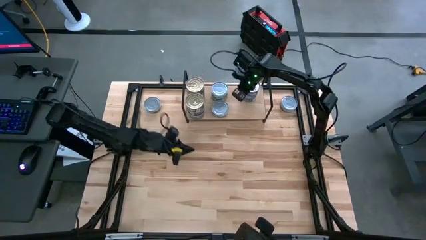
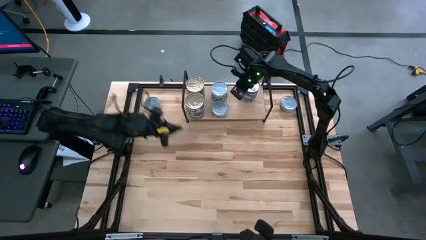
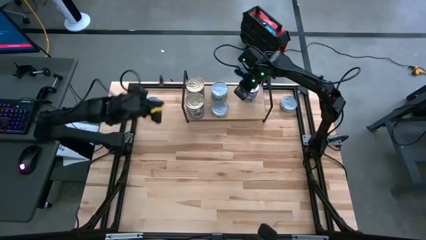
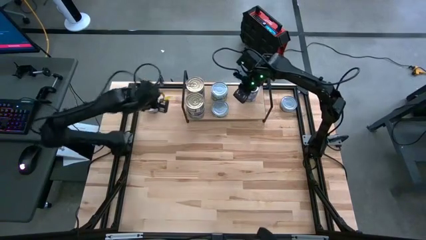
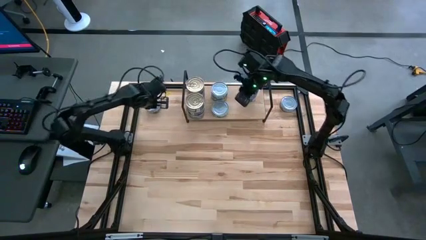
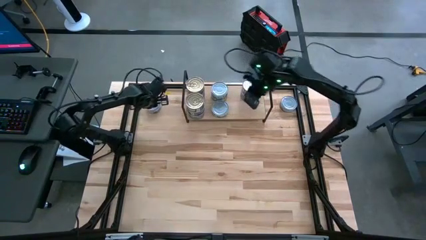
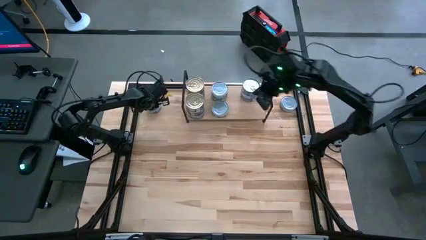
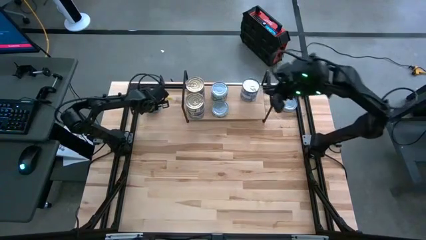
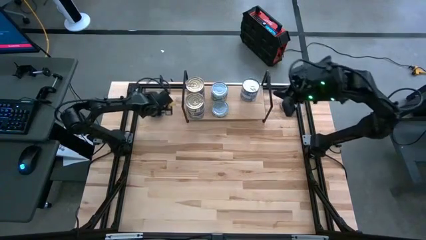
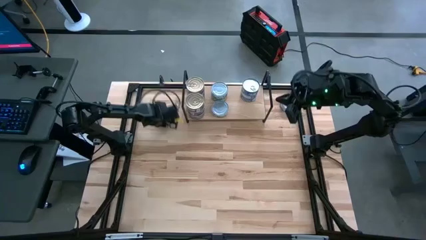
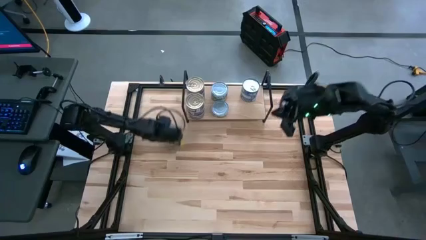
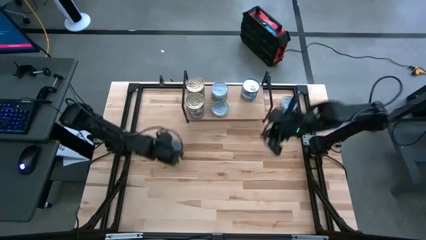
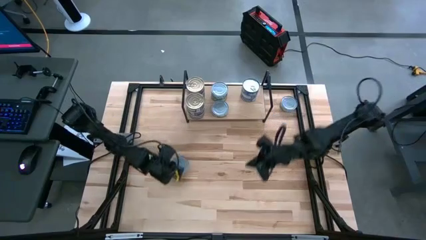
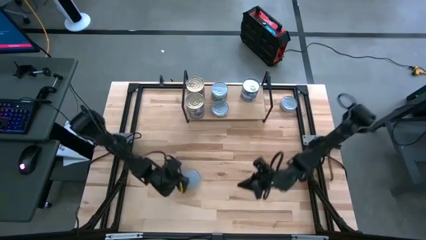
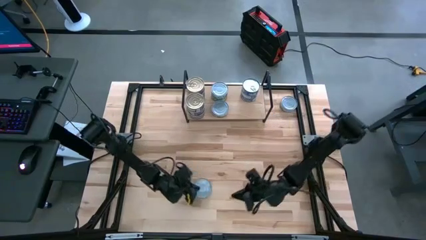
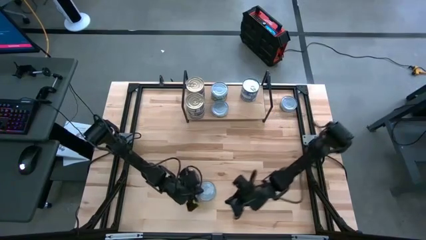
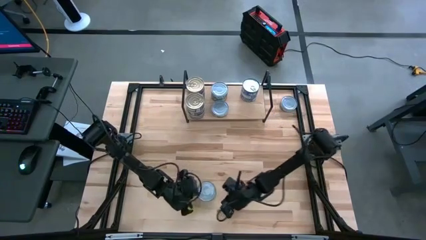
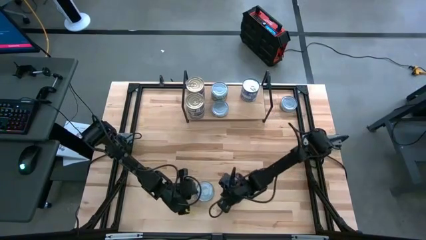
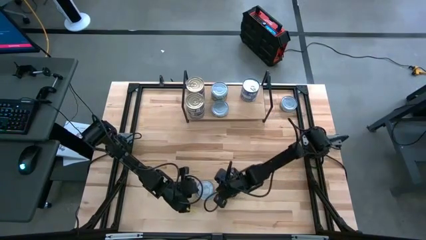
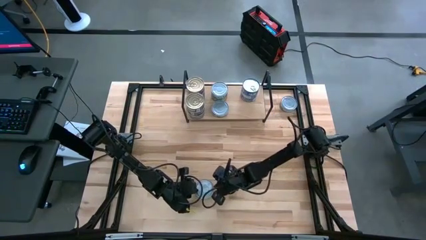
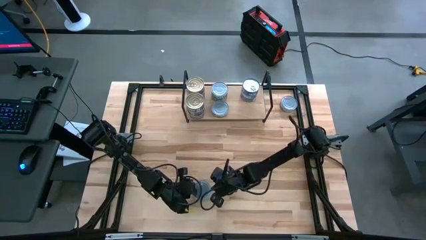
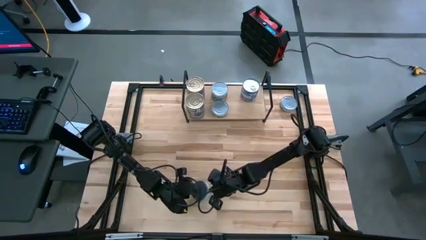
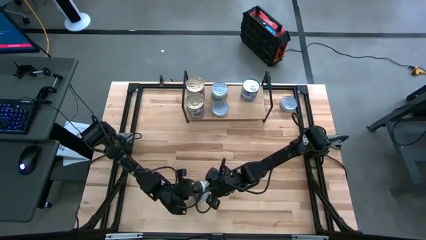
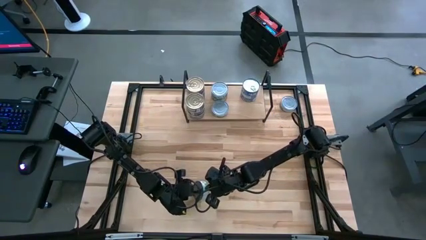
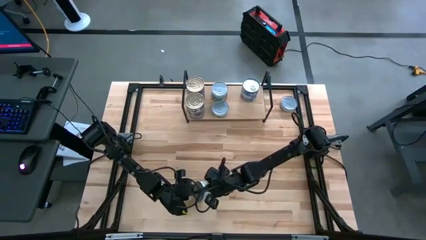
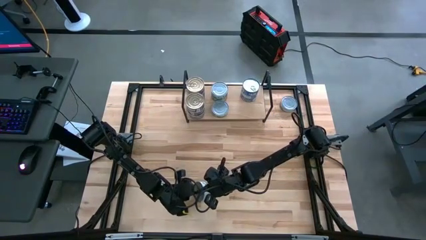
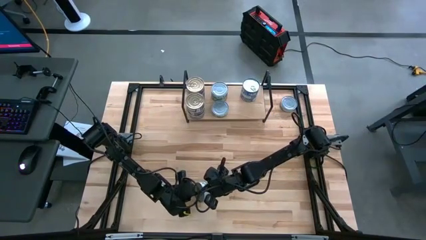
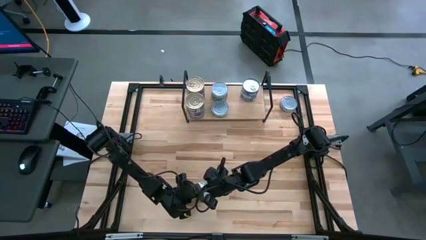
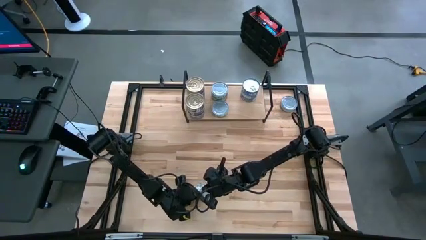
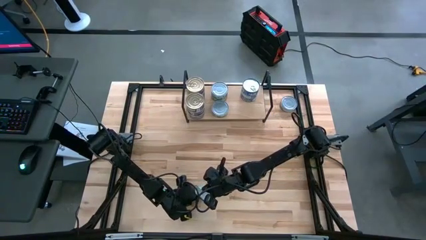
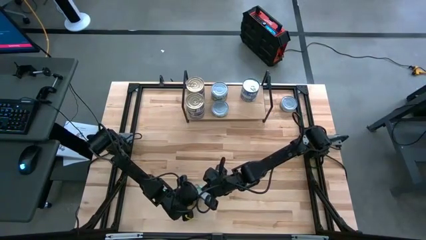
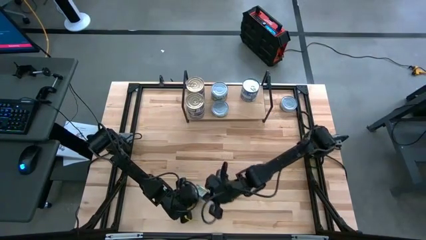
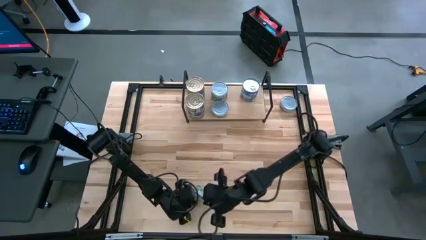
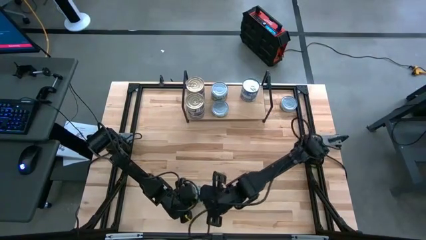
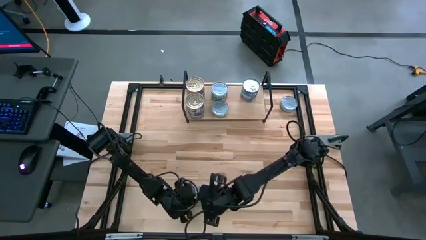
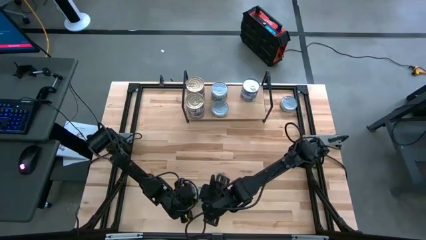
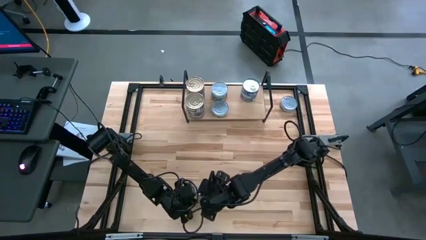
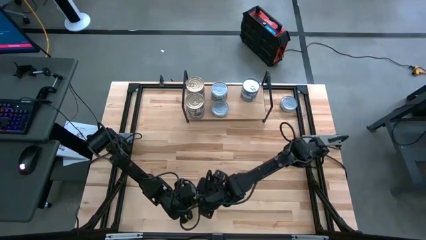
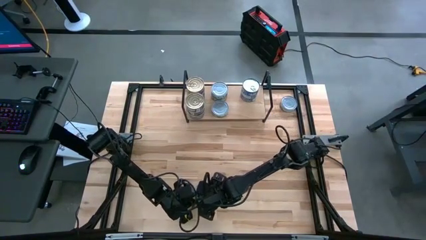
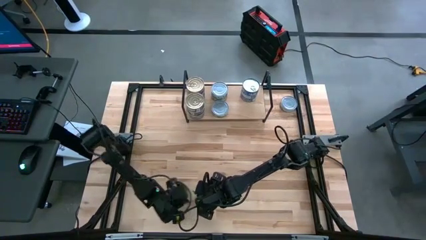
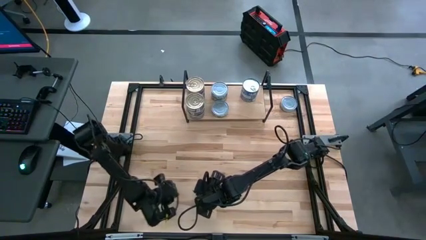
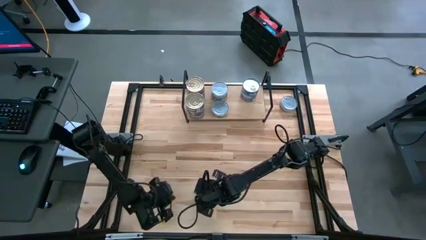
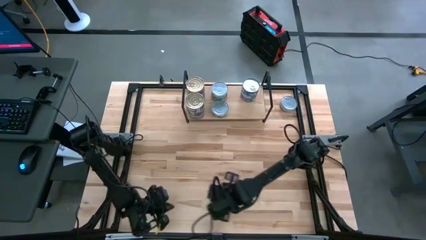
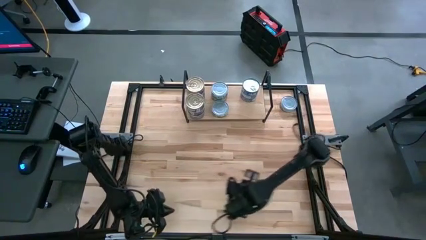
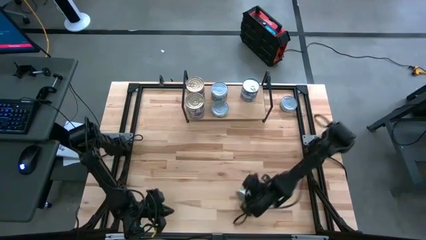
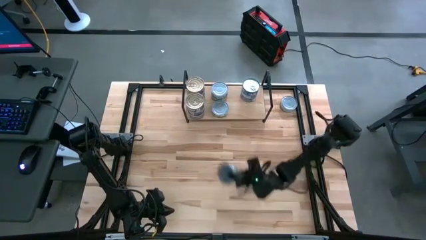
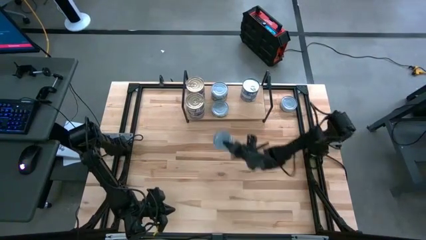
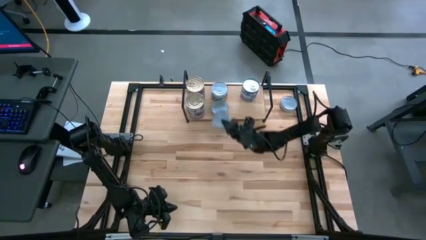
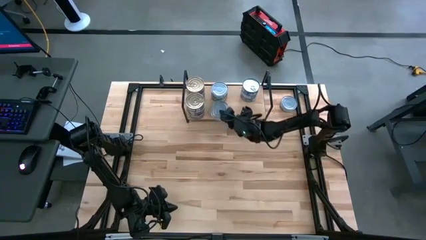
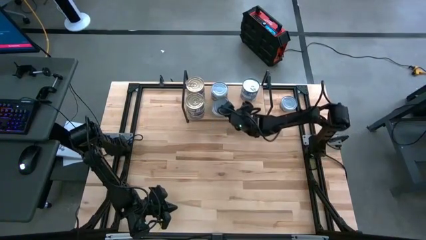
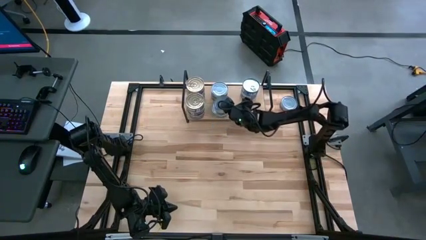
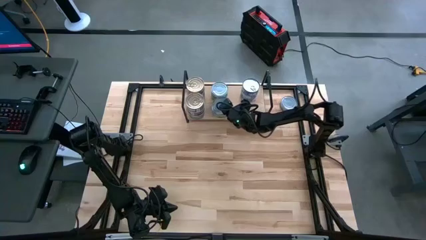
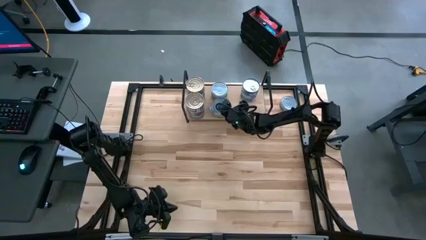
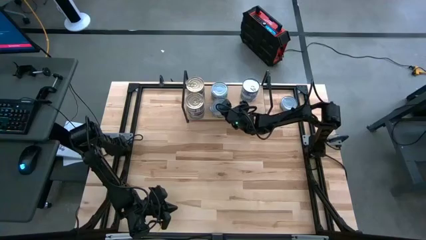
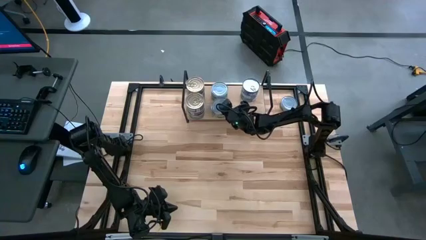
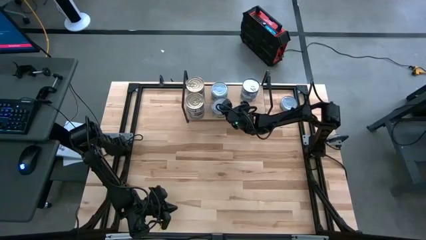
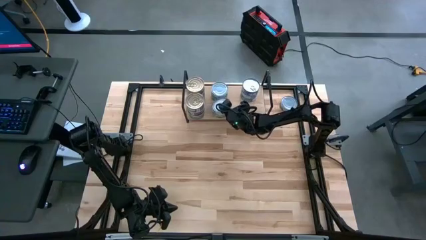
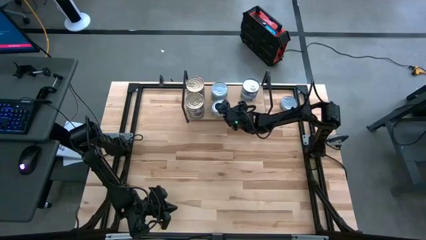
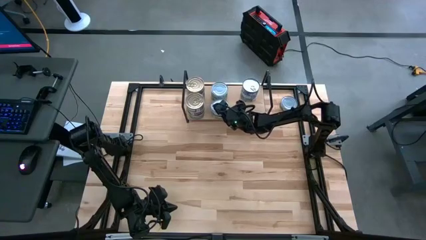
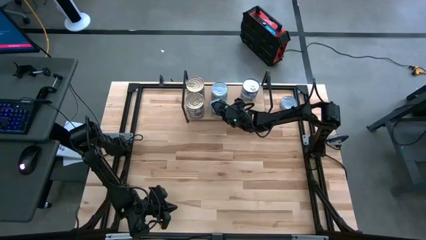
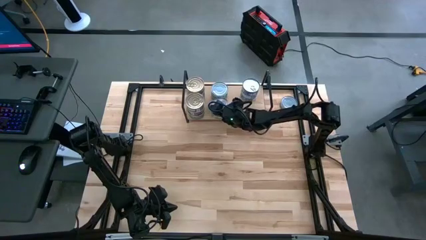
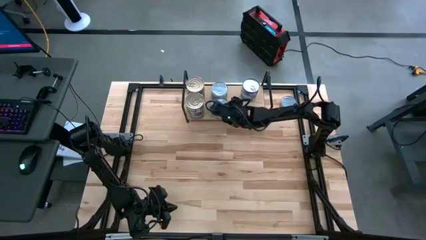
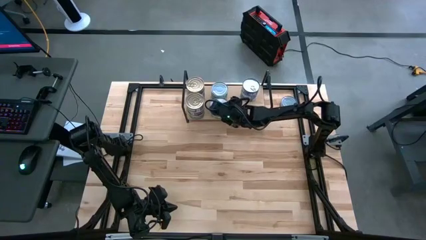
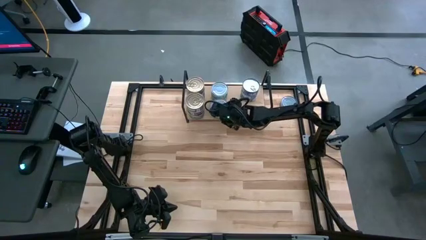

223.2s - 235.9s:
Task: Stack canned seafood by type on shelf
Stack the green white tuna can on top of the other green white tuna can on the shelf

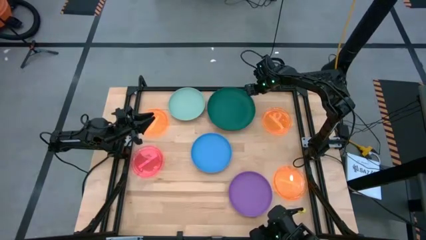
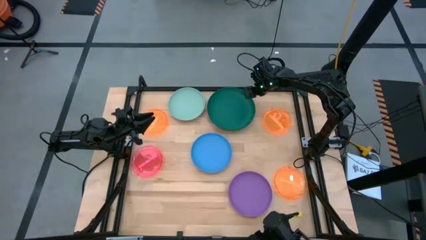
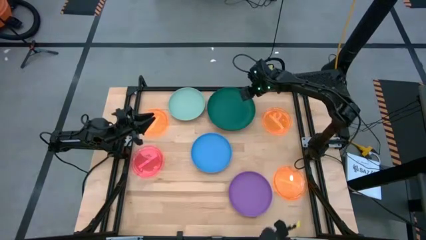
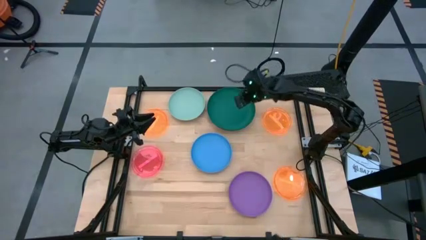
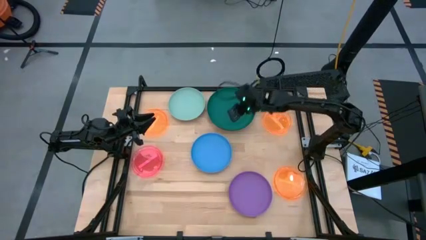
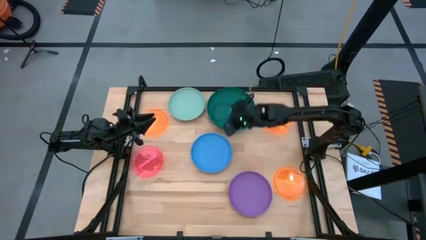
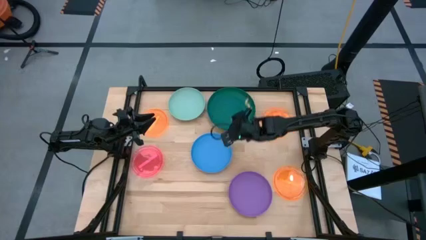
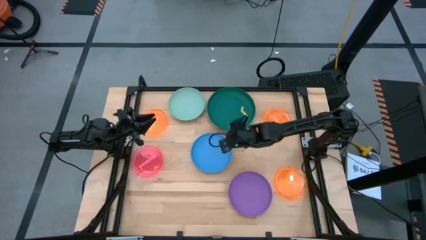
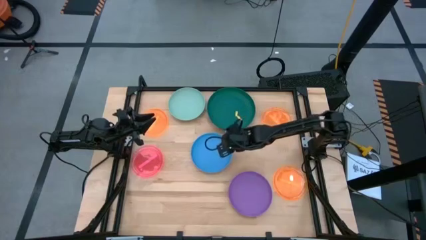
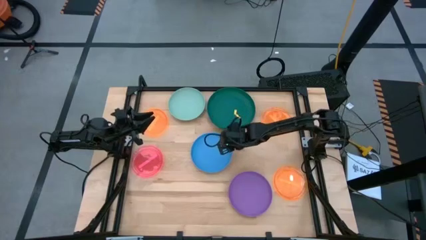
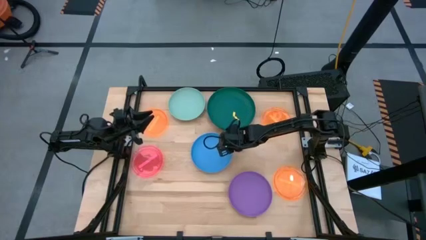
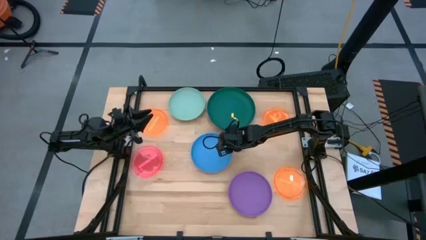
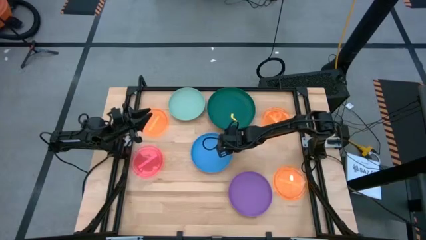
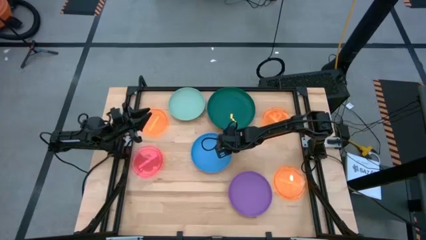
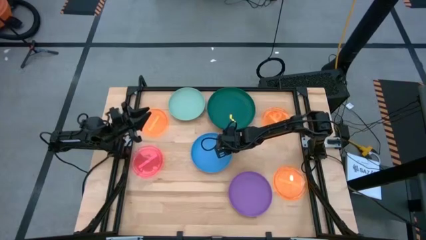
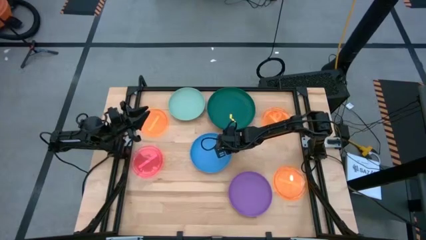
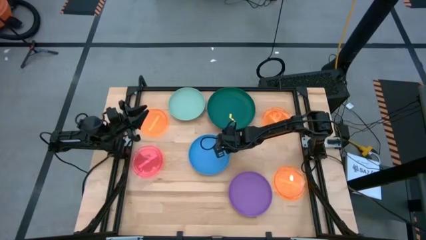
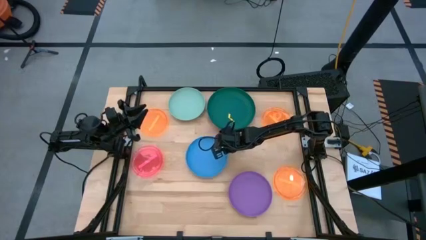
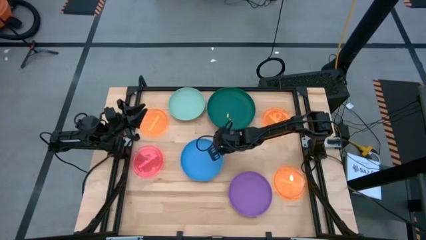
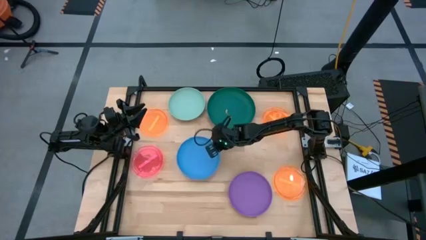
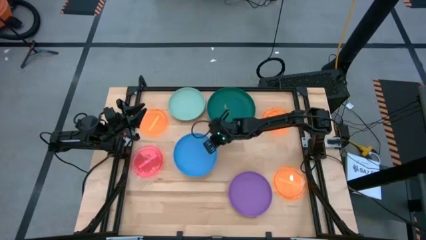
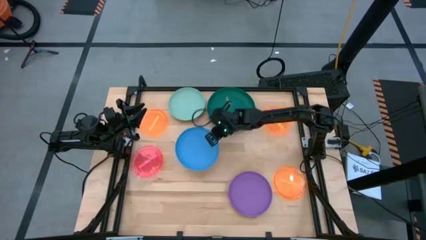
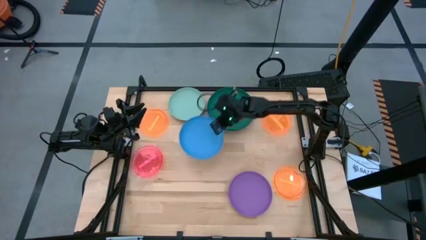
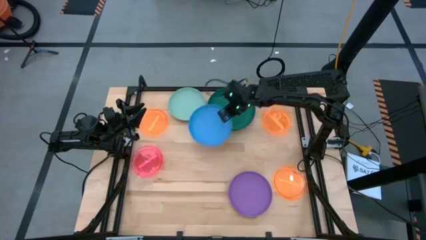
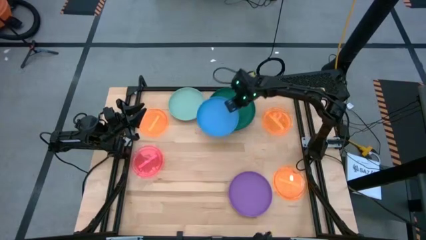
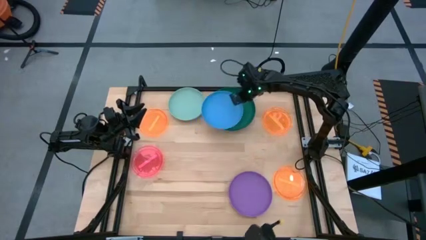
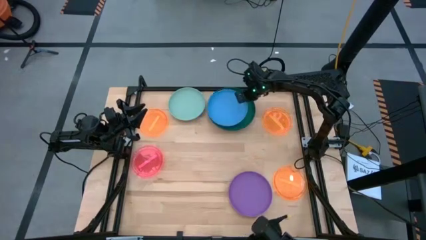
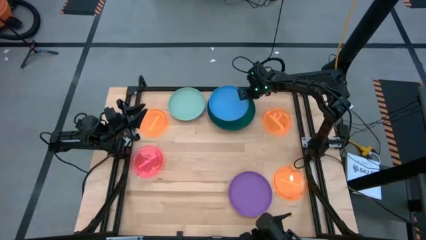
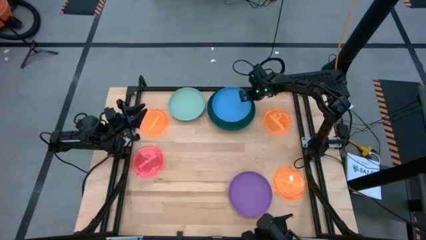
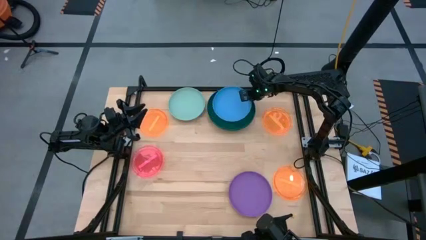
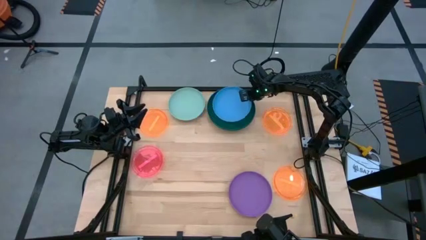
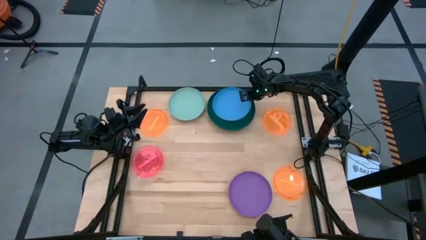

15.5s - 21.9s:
Task: Stack plastic plates
Stack the blue plate on the green plate
